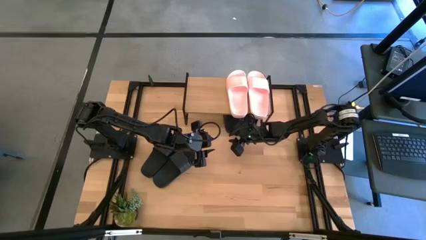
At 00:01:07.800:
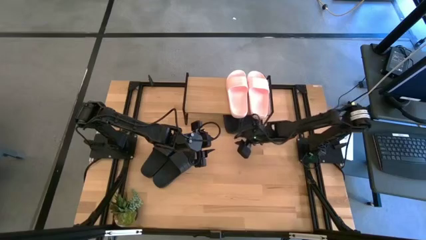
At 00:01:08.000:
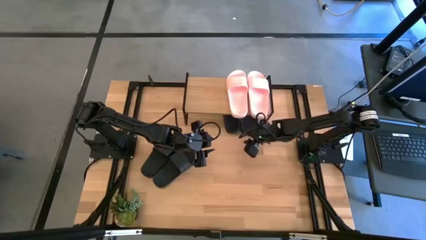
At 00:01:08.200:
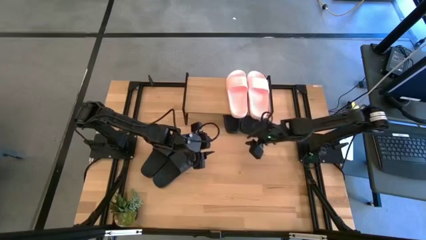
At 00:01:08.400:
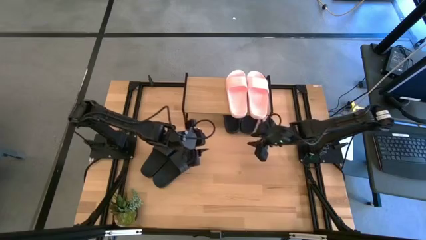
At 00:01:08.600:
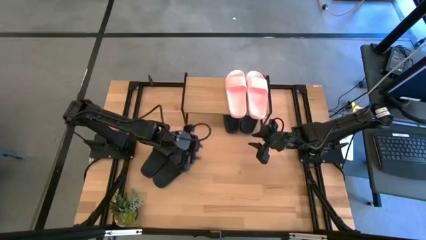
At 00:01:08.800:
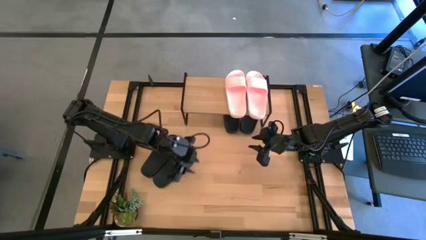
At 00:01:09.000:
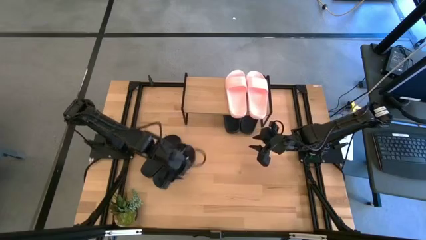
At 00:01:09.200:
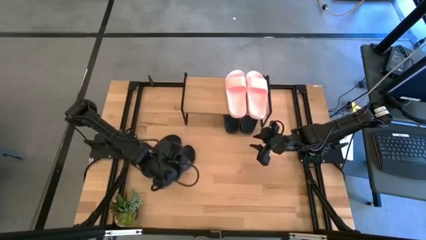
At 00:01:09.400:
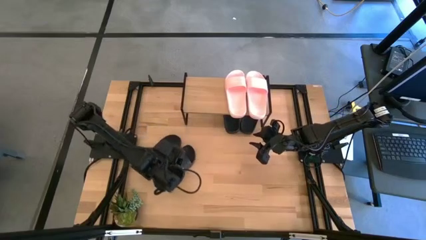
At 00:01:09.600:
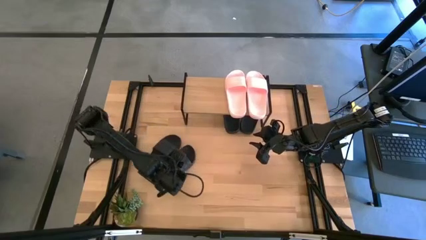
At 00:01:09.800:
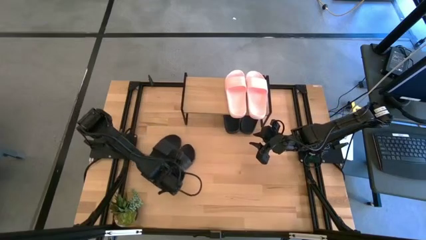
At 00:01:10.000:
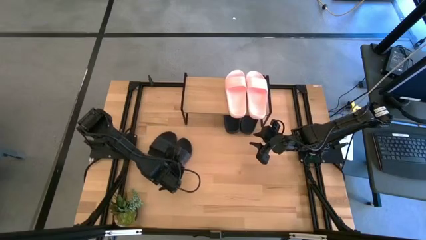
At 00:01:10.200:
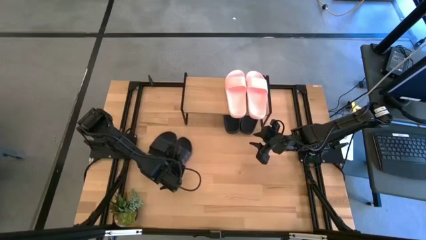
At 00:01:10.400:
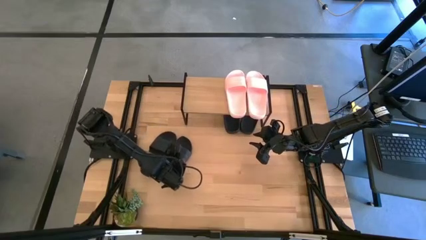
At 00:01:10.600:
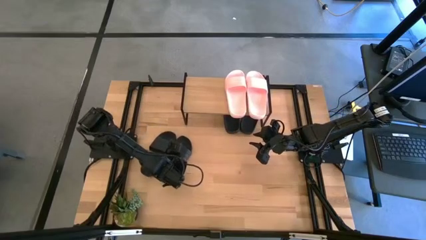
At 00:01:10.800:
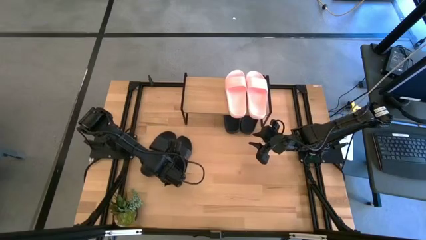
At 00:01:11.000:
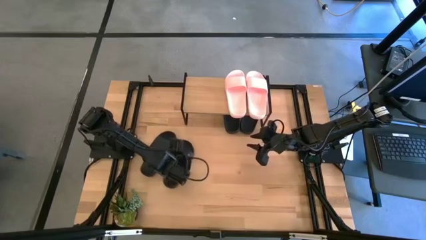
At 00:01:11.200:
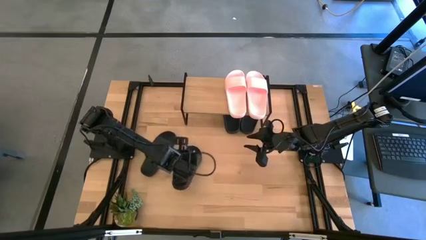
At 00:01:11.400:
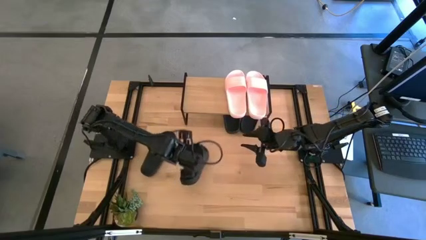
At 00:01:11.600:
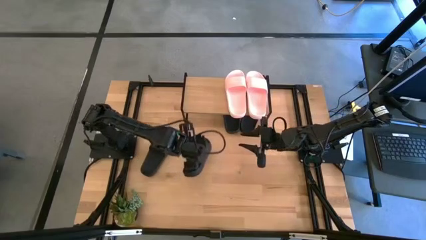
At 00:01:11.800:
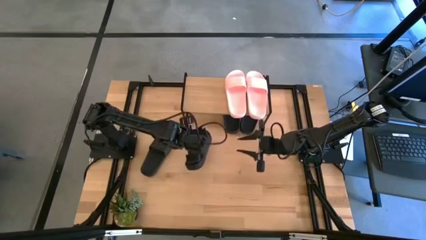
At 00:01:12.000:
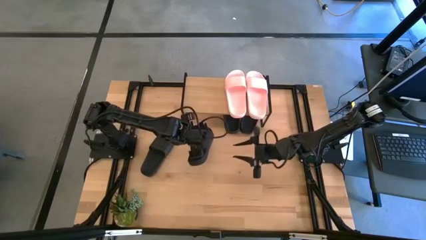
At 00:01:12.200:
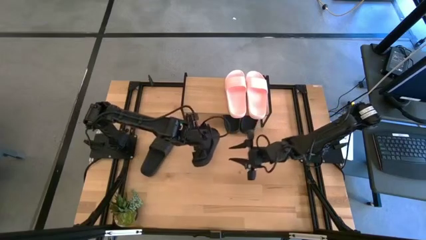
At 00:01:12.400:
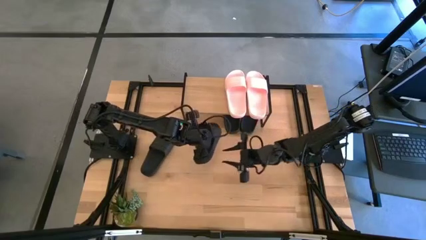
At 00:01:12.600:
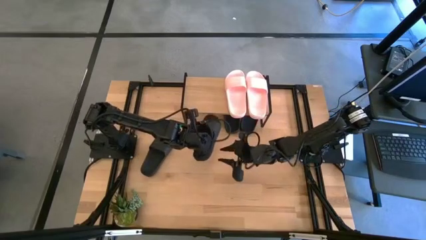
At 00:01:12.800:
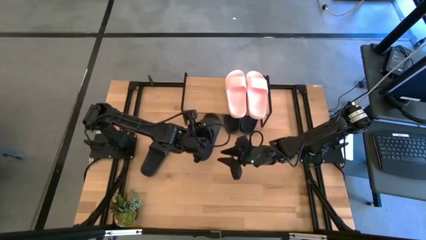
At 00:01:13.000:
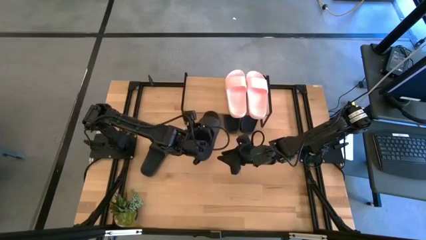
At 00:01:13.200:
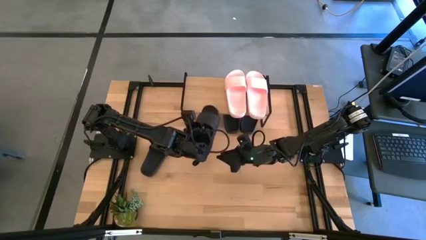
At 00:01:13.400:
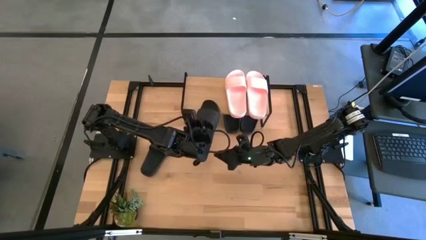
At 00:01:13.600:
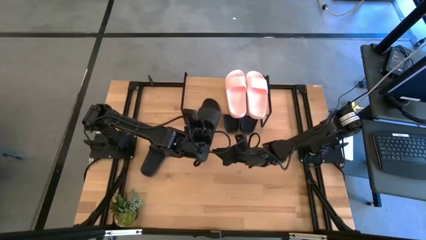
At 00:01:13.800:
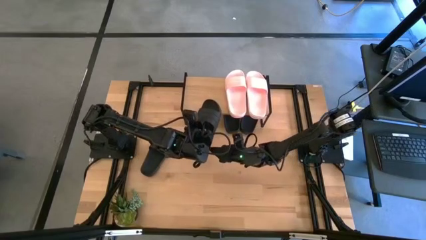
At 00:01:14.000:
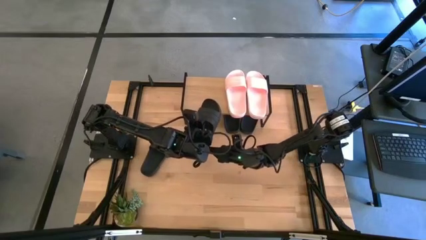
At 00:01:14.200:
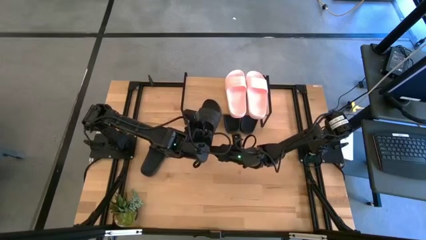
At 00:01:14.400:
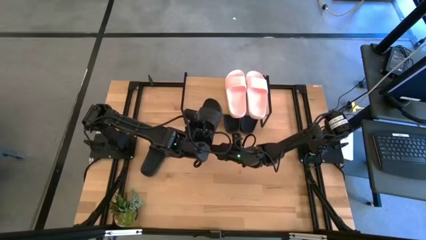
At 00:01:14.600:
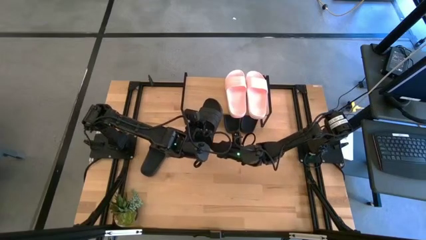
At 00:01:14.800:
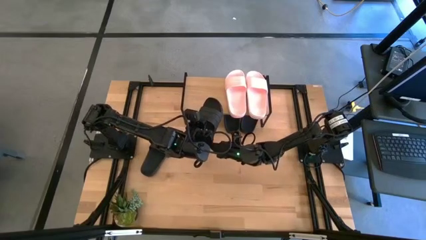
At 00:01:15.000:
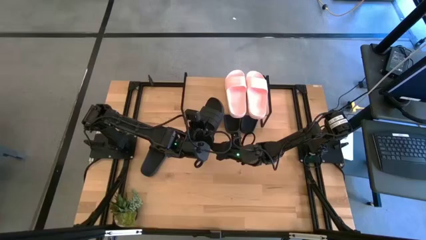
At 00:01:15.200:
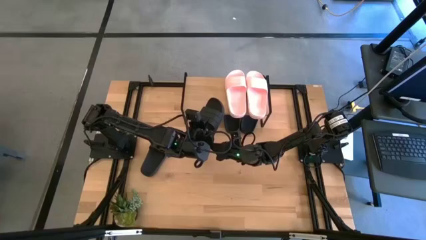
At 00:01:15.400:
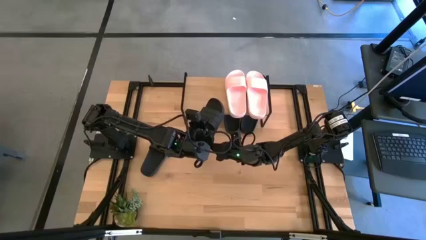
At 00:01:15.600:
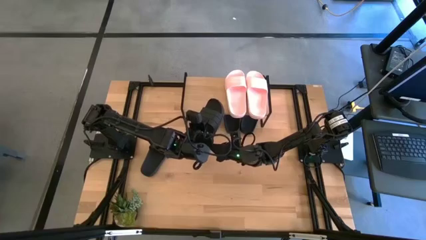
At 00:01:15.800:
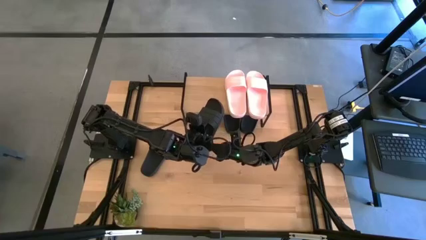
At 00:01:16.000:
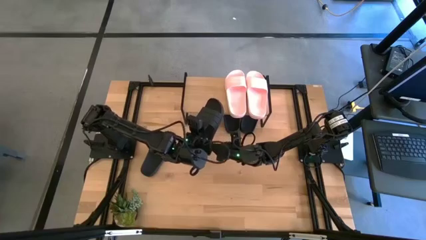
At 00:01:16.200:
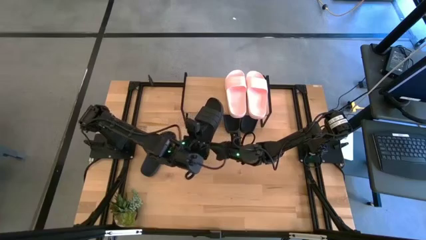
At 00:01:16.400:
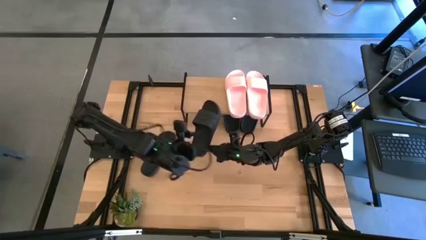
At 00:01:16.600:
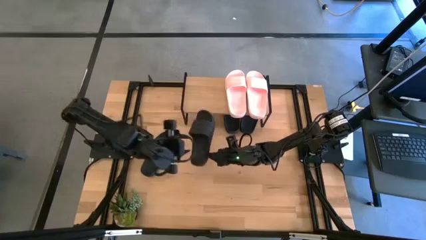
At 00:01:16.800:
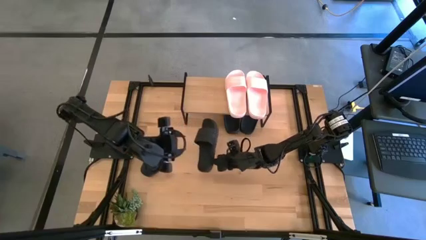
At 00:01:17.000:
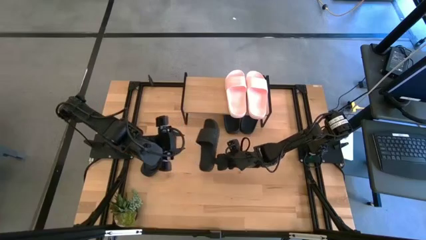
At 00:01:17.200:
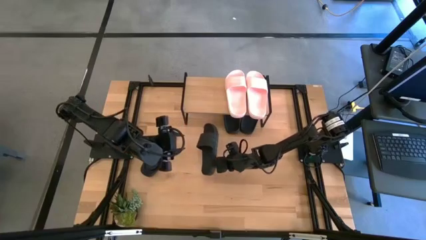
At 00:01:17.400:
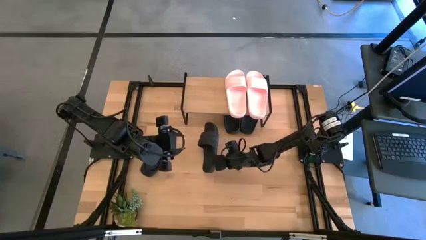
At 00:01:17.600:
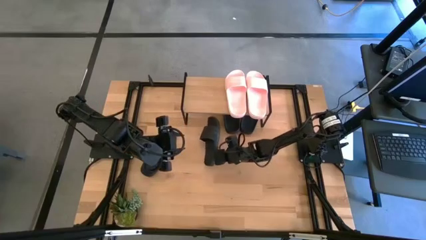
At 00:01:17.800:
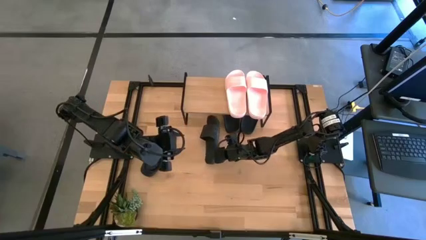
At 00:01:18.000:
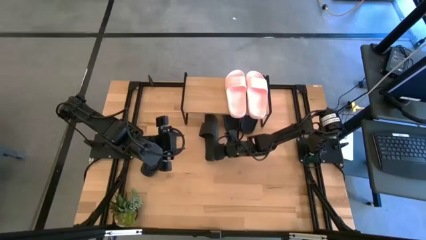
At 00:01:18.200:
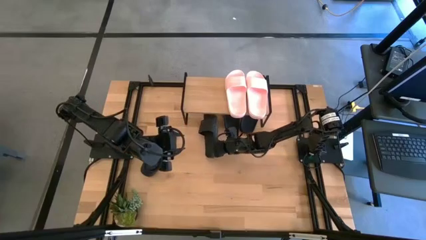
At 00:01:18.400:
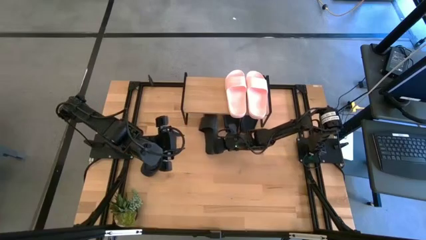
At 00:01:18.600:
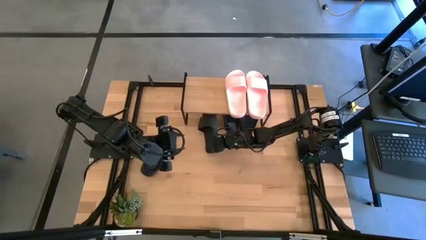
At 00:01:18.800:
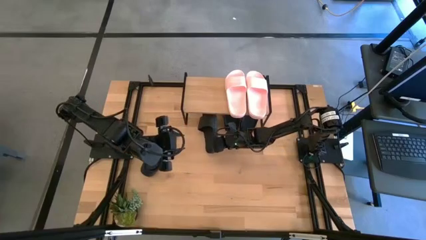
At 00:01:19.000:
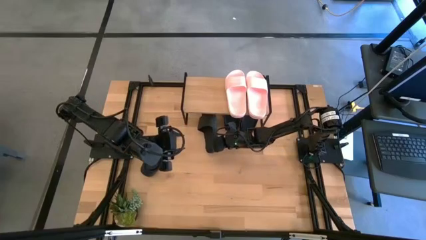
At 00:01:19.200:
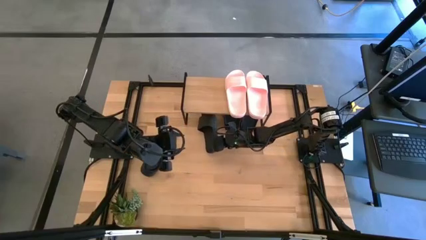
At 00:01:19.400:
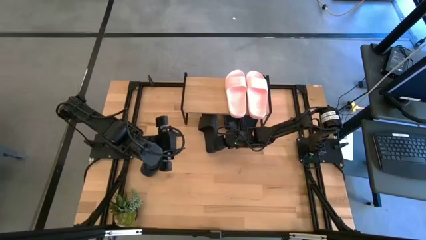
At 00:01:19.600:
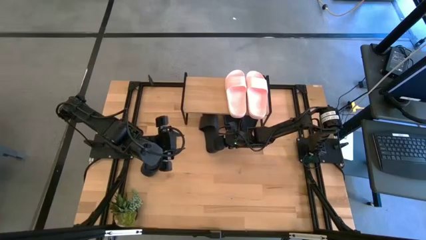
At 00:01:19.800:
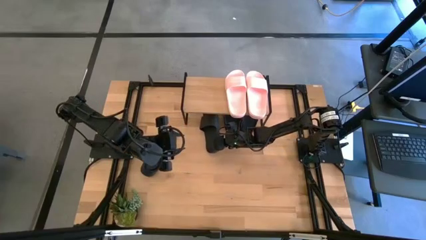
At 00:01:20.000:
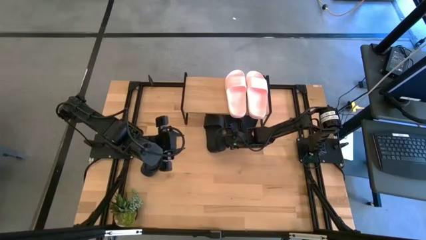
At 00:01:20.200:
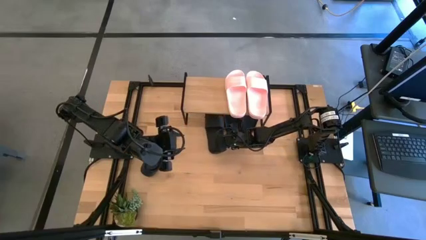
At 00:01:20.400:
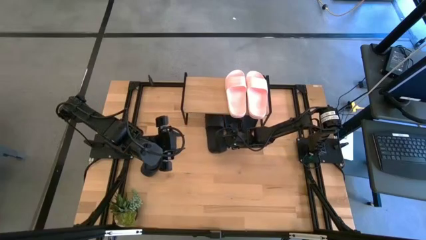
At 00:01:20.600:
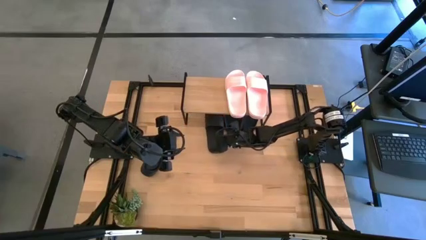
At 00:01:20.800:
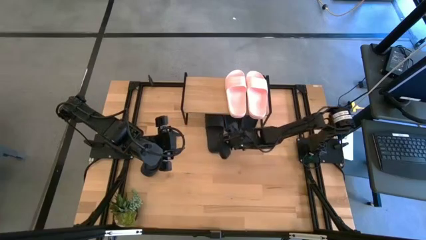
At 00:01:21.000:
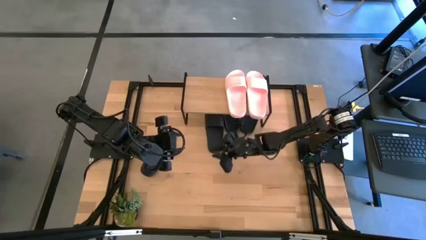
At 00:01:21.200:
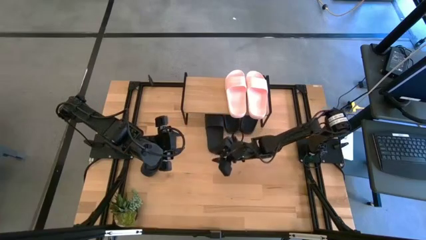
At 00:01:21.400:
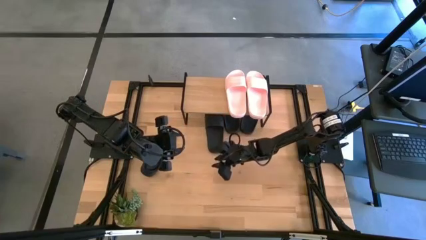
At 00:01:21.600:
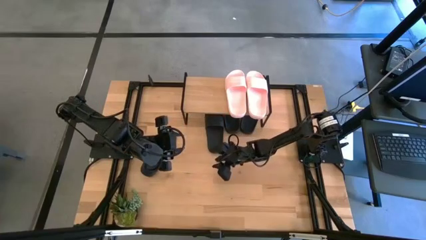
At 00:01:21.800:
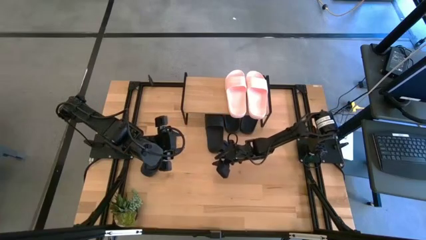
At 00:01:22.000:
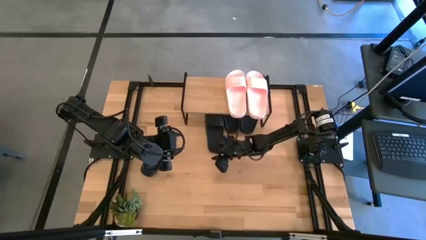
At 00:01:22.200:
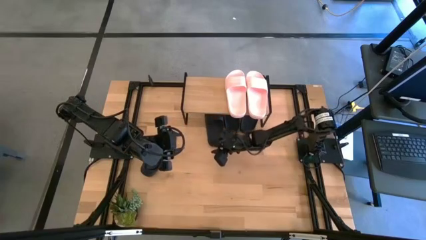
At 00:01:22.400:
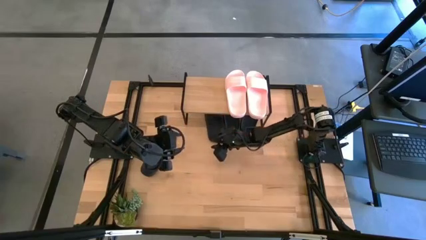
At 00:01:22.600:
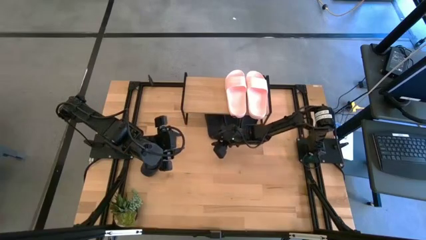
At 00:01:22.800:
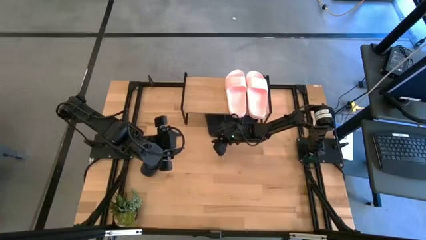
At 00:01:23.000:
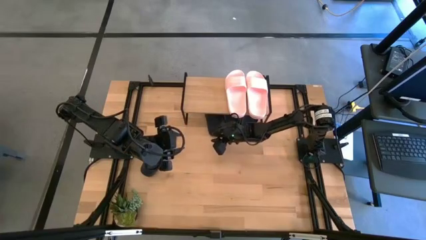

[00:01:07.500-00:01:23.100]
Task: Pick and place slides into the shelf
Put the right black slide under the shelf

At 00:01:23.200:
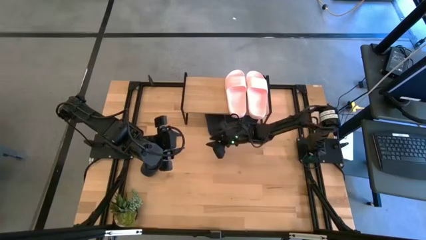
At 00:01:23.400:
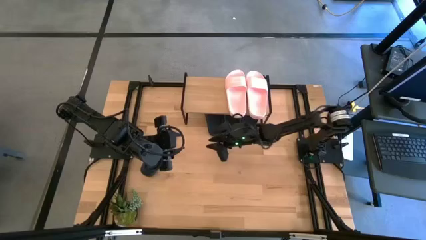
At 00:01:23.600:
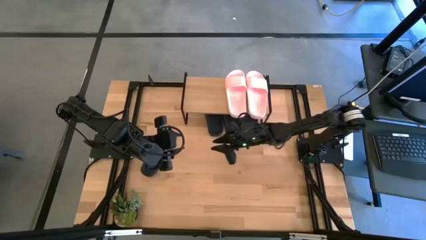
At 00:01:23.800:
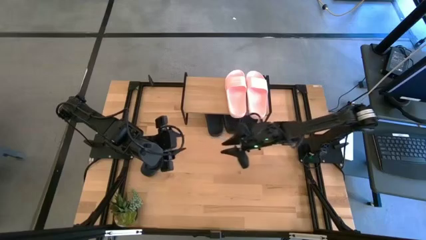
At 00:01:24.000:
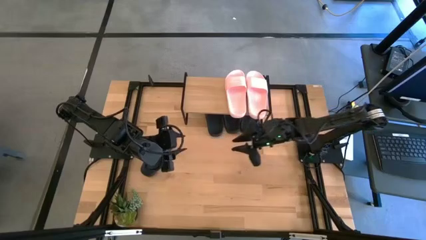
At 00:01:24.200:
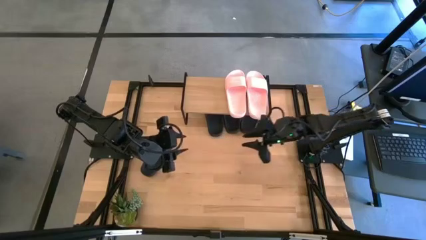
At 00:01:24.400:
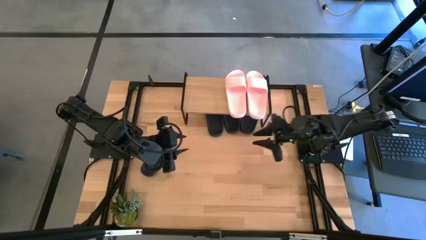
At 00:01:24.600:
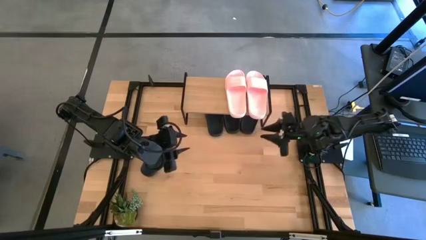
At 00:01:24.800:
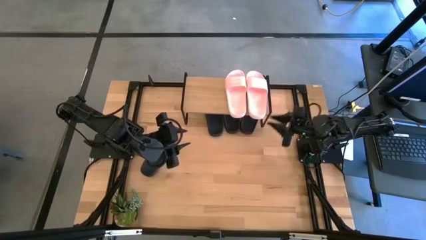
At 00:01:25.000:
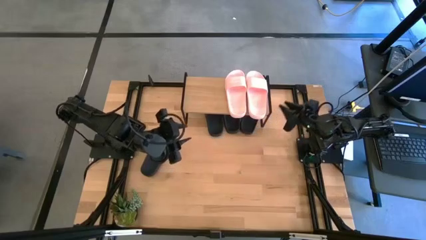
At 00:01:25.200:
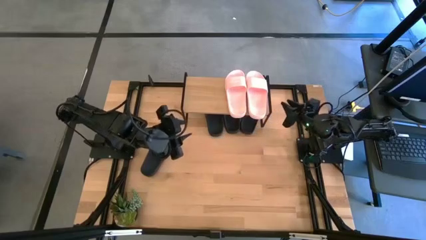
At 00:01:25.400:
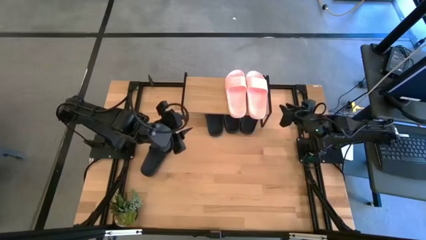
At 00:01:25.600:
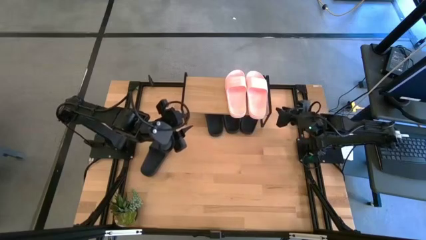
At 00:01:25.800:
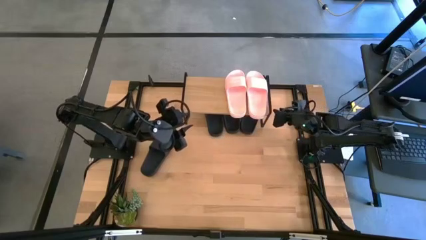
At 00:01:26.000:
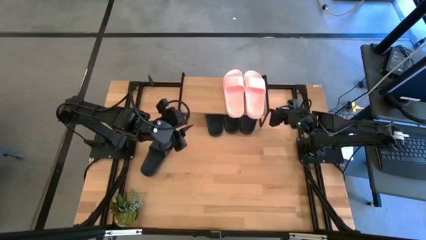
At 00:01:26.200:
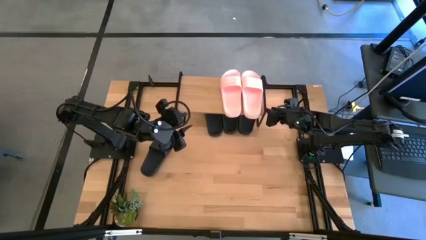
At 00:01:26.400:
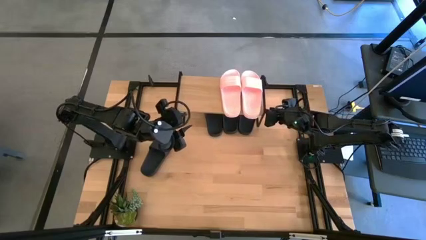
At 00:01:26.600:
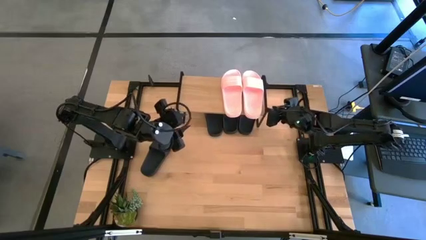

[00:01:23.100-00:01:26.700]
Adjust the shelf
